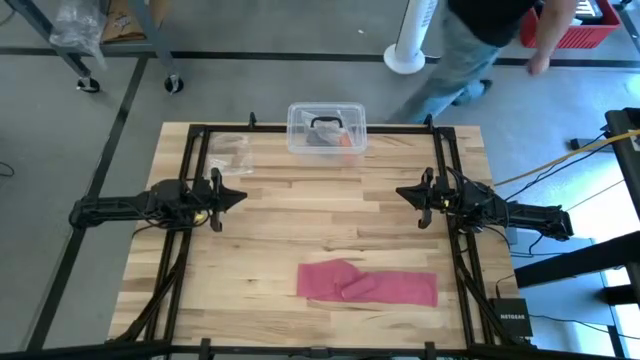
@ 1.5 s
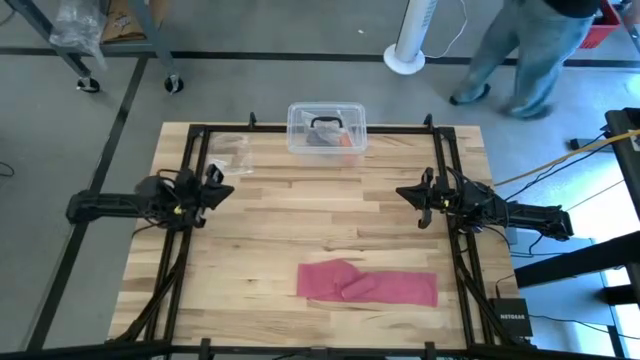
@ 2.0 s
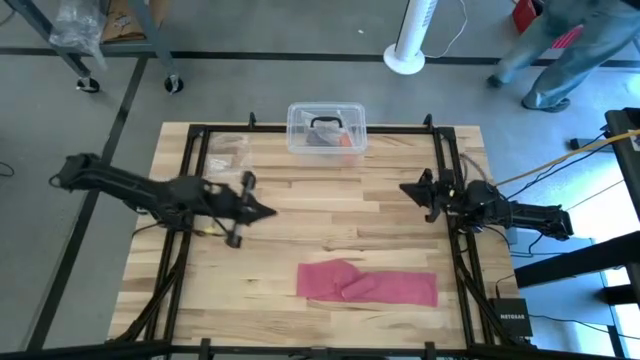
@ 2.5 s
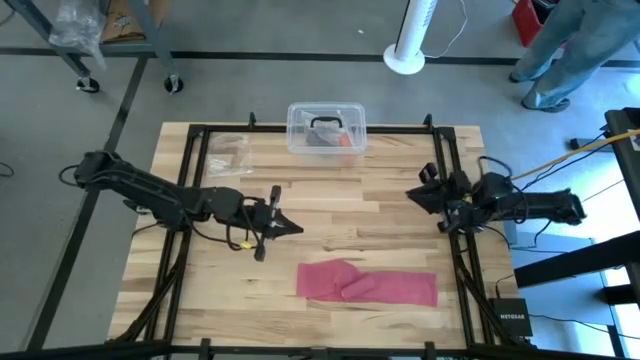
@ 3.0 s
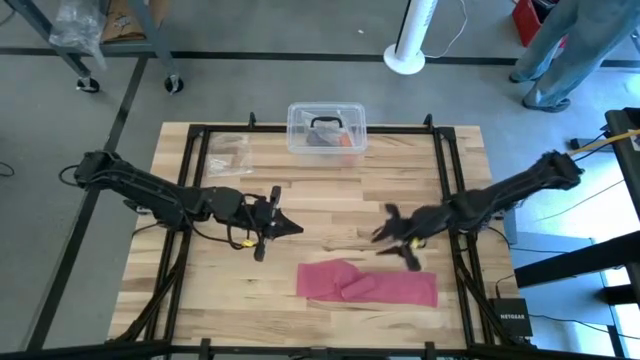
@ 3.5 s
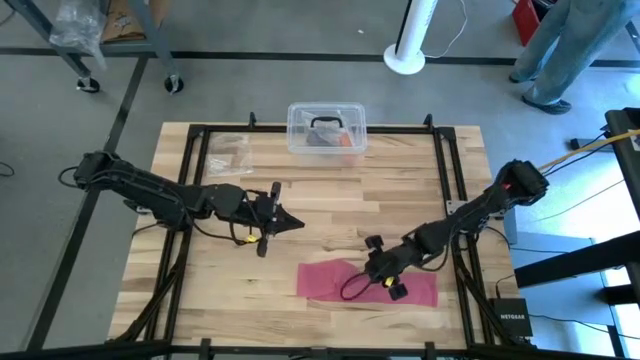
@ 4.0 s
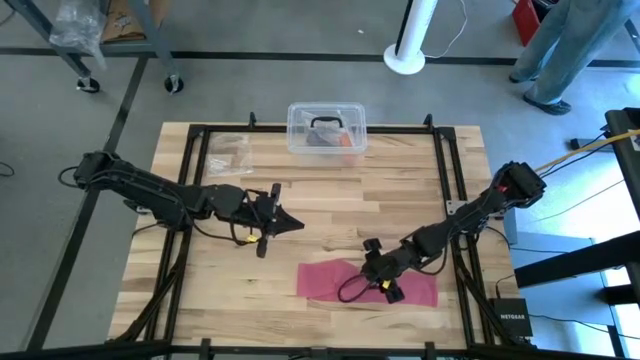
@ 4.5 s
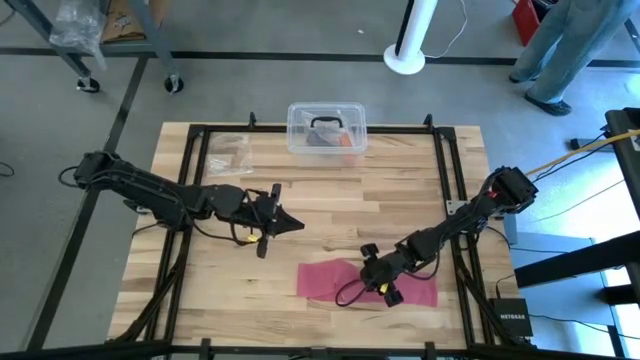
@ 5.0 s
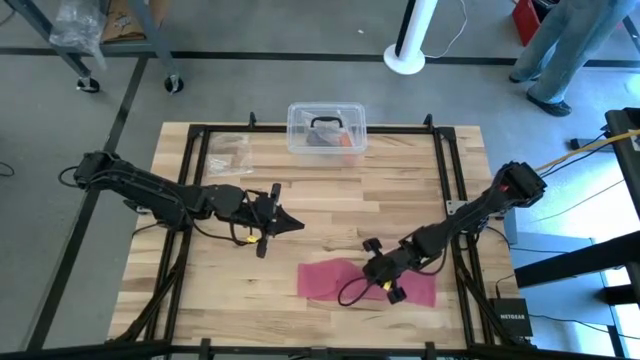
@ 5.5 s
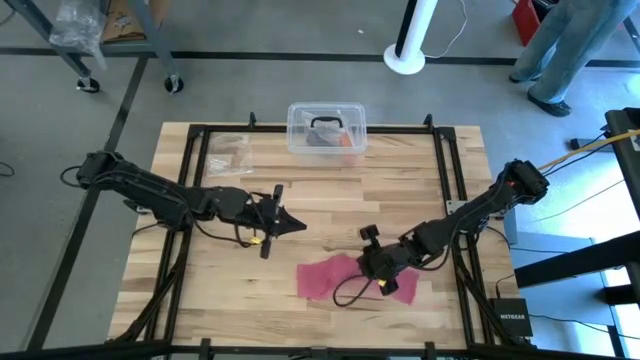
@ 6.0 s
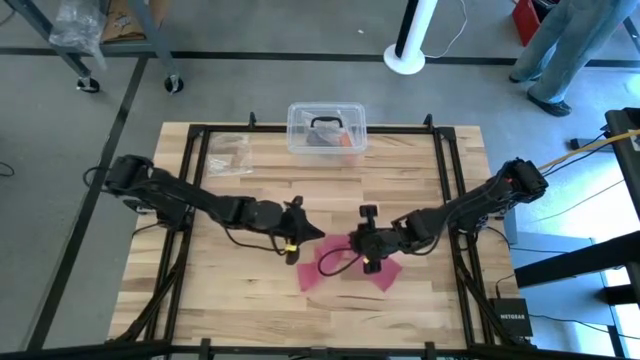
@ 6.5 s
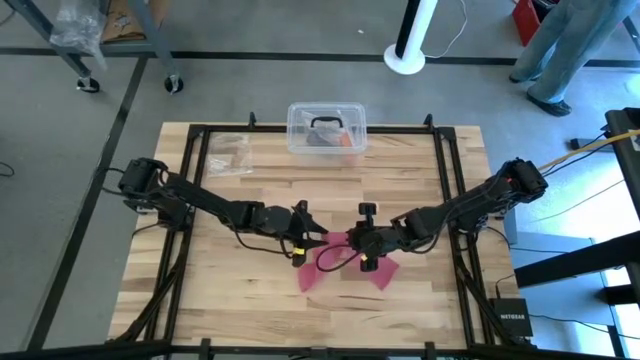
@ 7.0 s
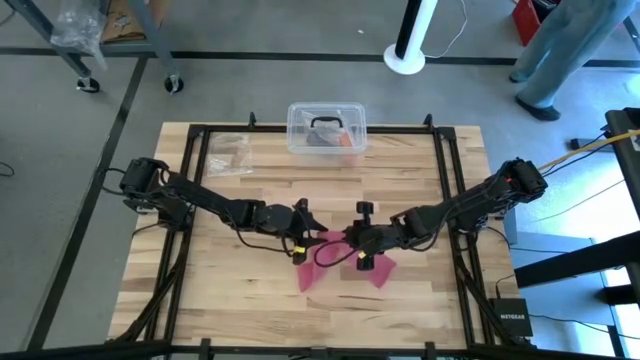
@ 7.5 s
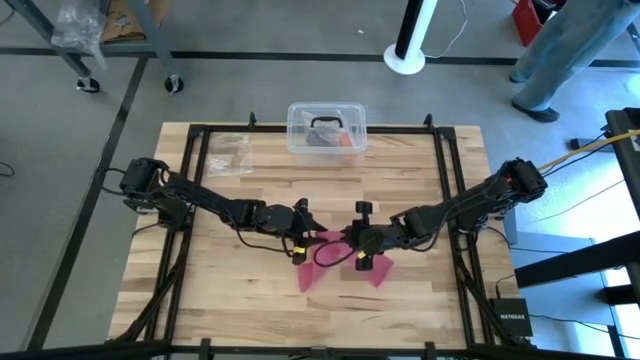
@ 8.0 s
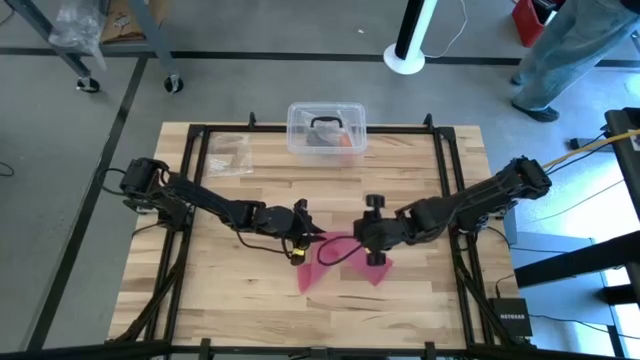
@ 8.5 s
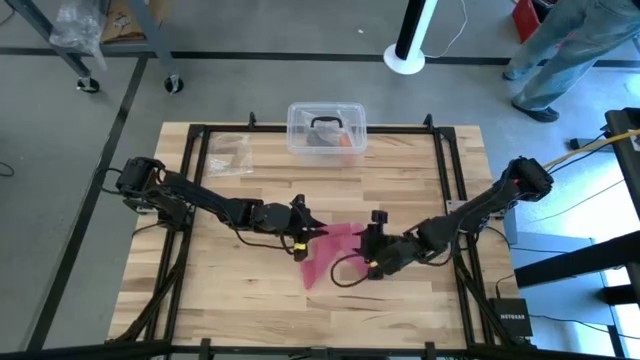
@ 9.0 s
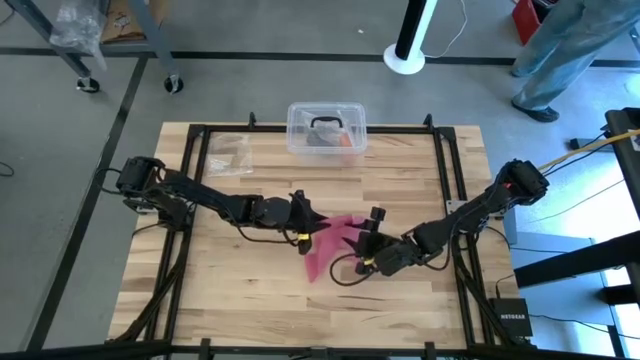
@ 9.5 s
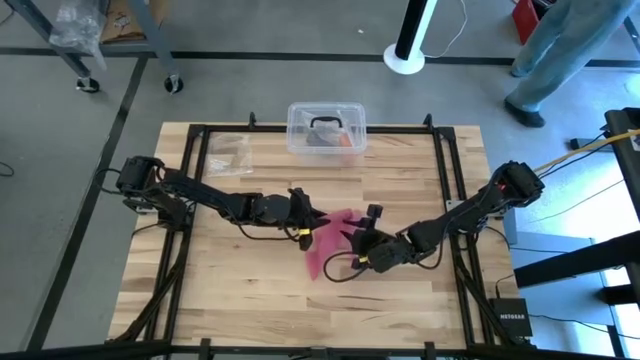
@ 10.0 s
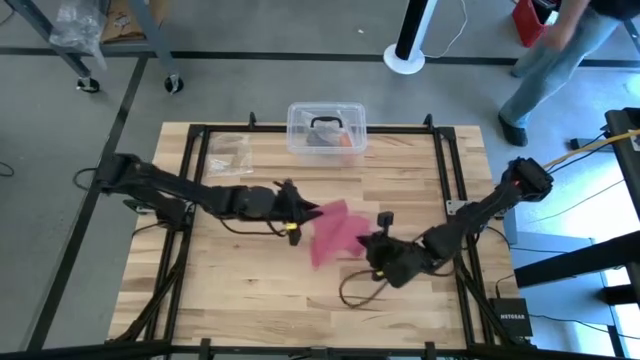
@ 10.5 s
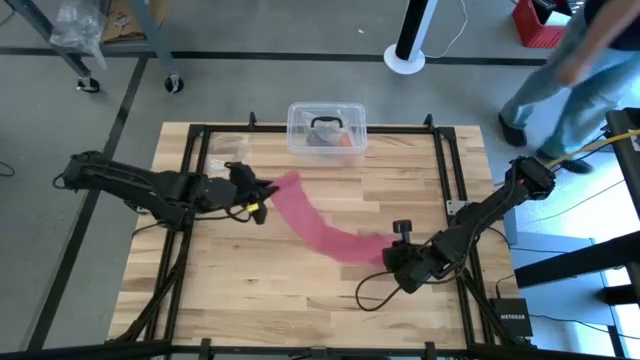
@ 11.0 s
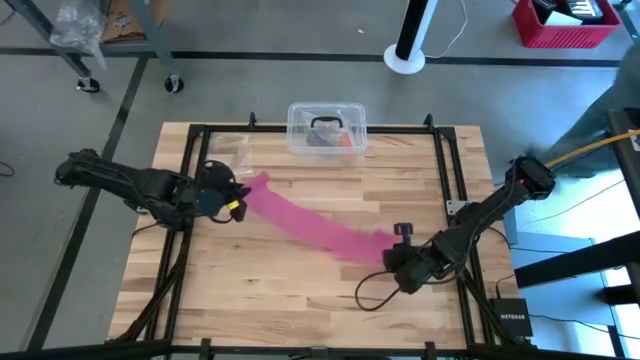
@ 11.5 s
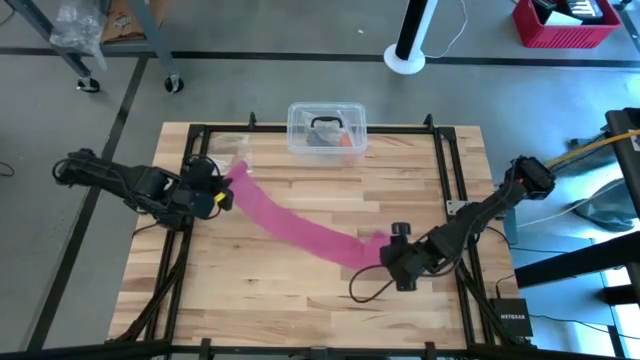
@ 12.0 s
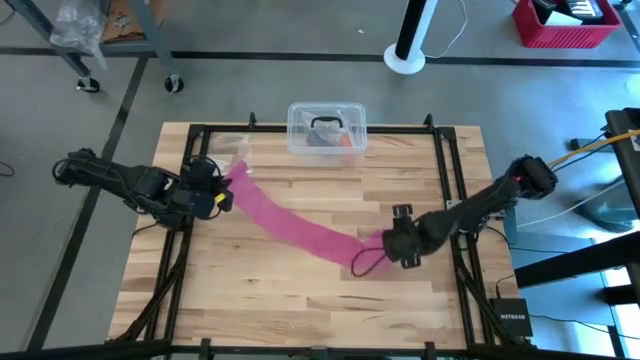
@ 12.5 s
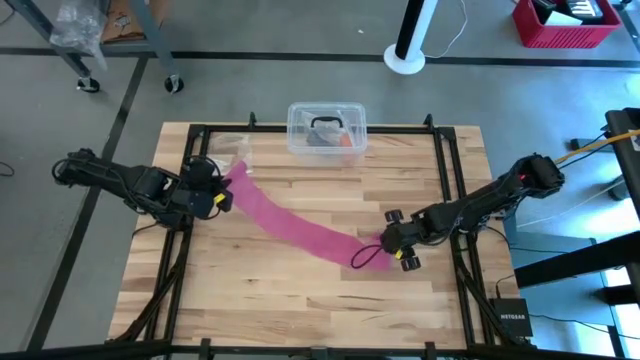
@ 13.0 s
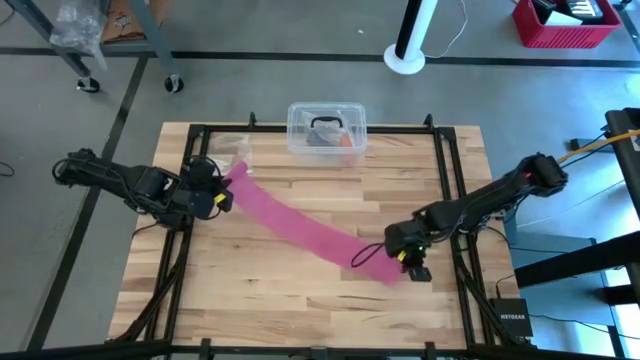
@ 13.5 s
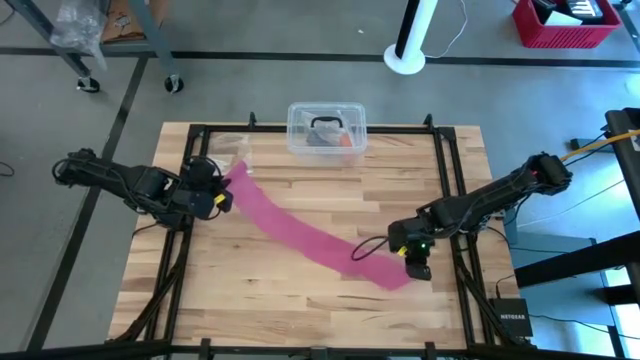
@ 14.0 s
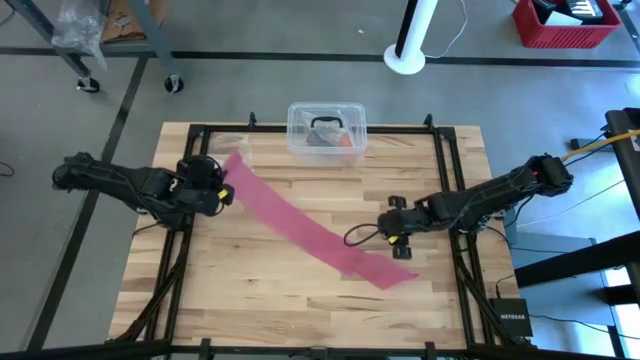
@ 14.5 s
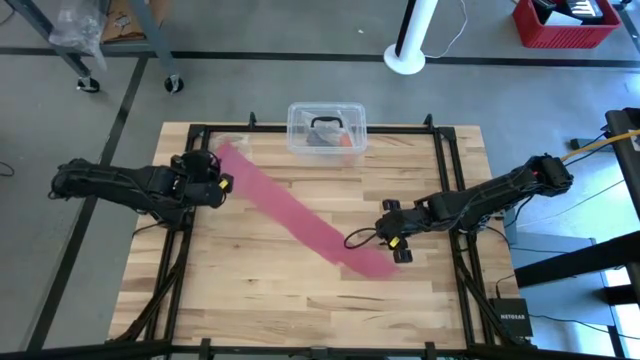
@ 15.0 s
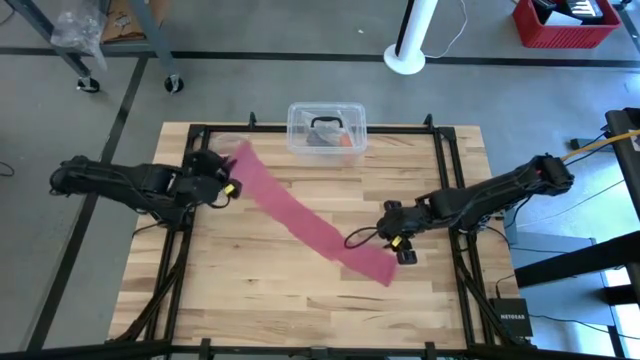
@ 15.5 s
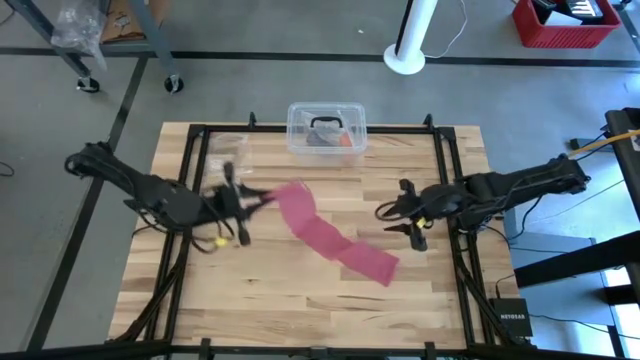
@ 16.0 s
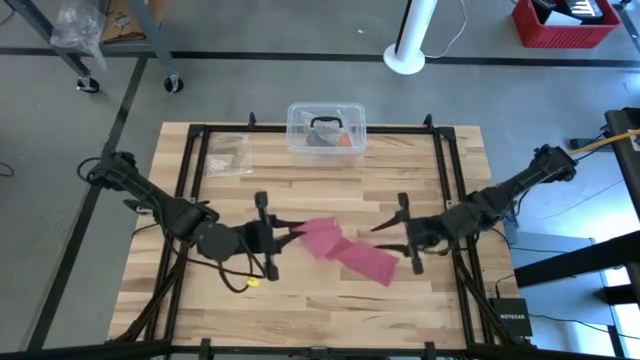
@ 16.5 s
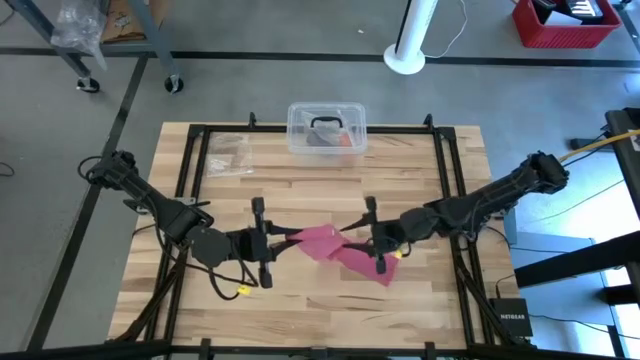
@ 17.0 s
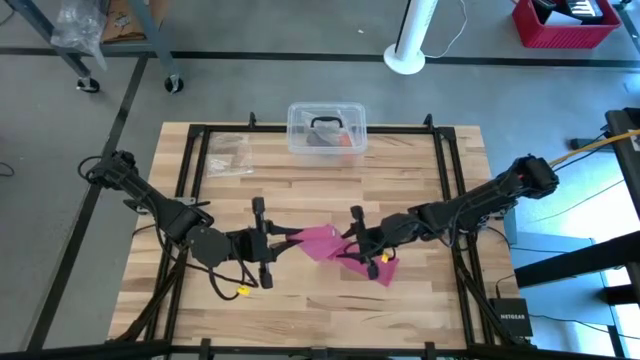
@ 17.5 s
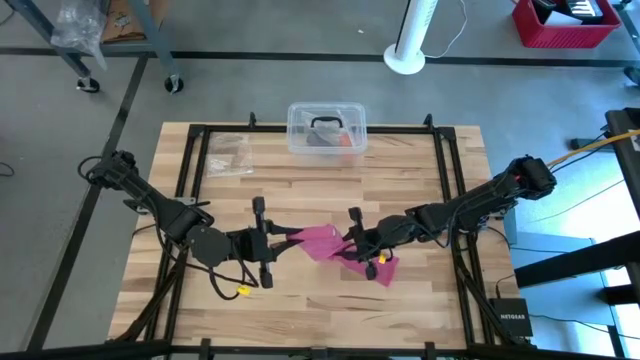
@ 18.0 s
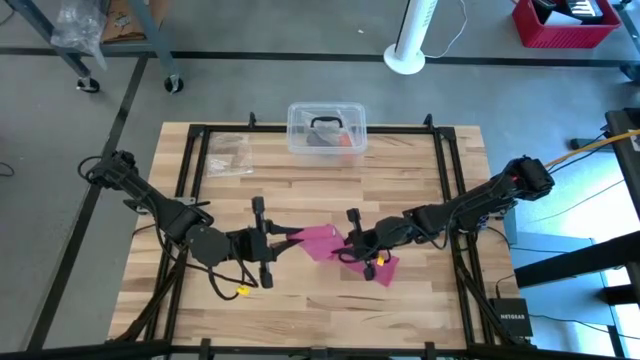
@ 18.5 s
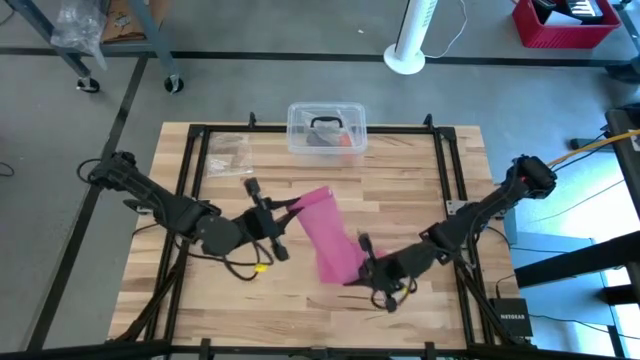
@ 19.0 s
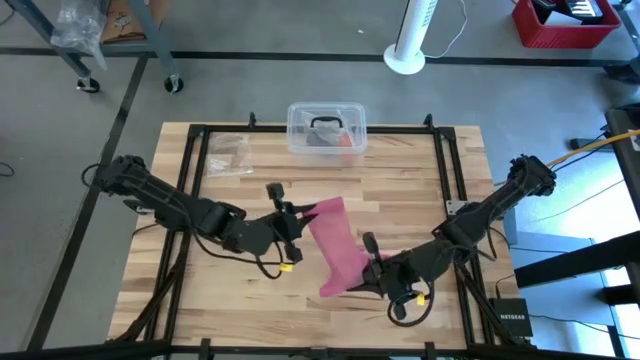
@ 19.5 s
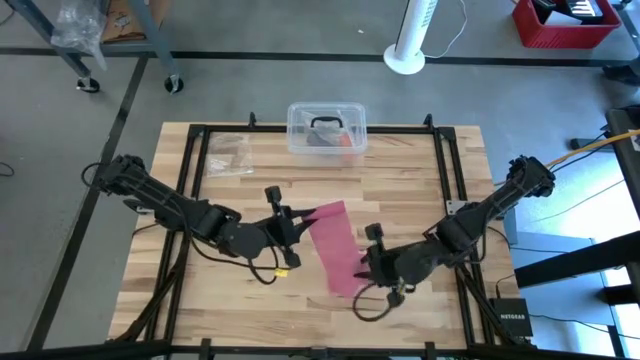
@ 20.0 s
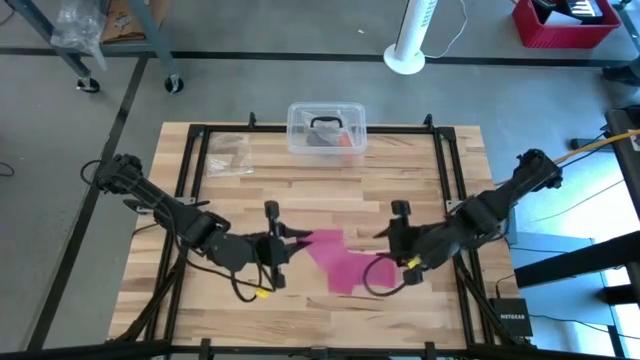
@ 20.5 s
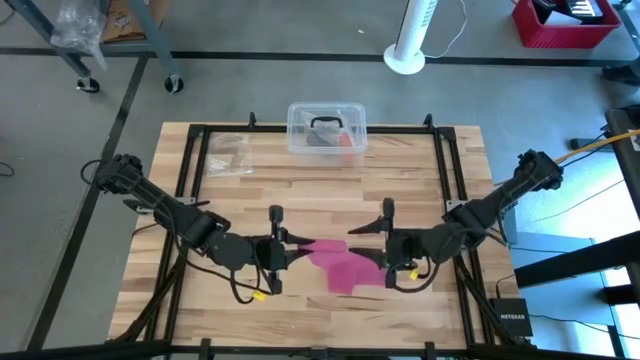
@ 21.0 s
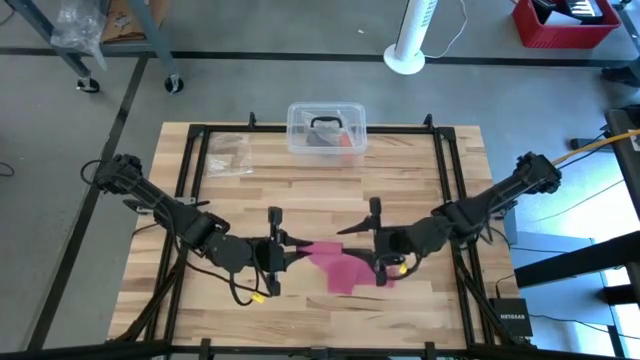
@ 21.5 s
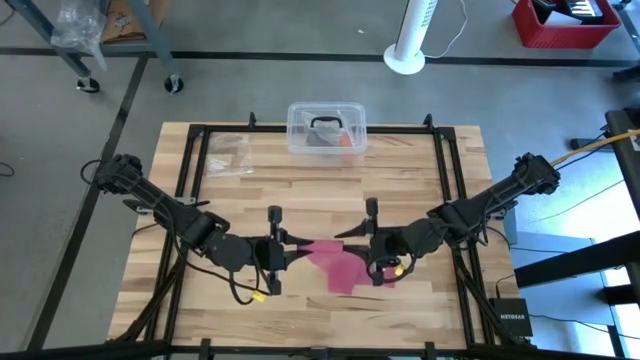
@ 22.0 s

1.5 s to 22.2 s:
Task: Roll bandage
Roll the pink bandage
